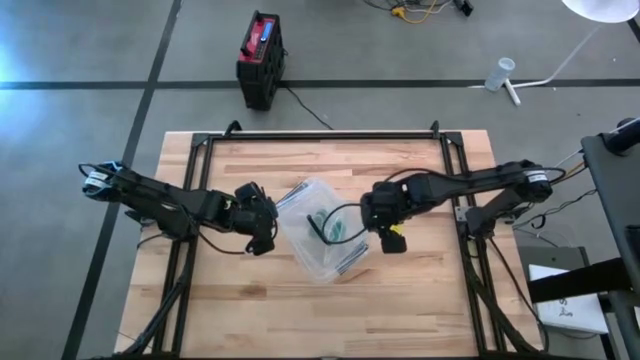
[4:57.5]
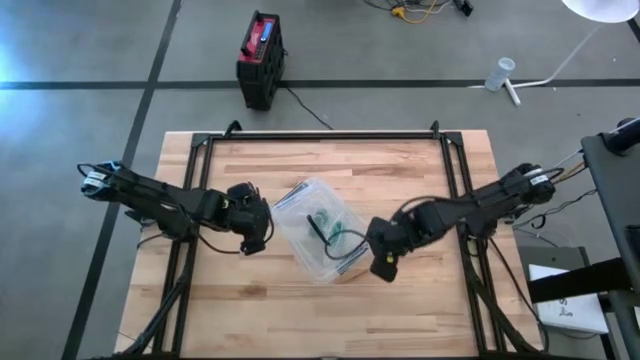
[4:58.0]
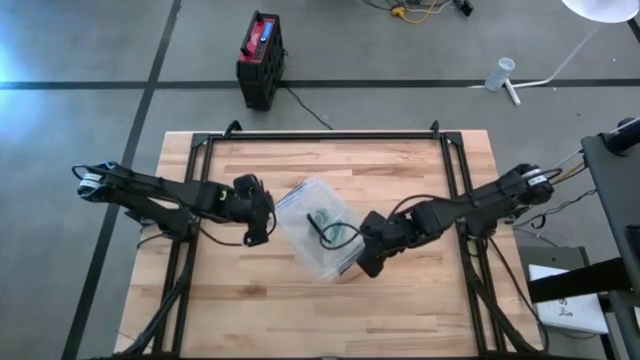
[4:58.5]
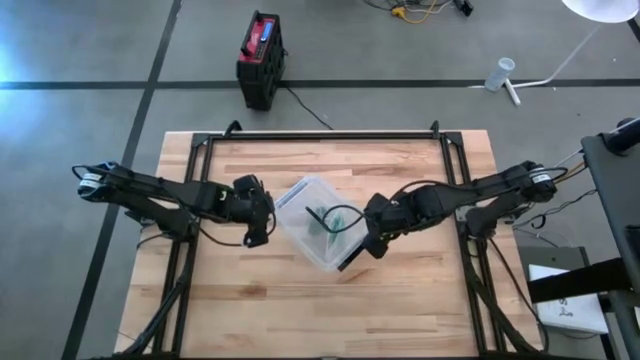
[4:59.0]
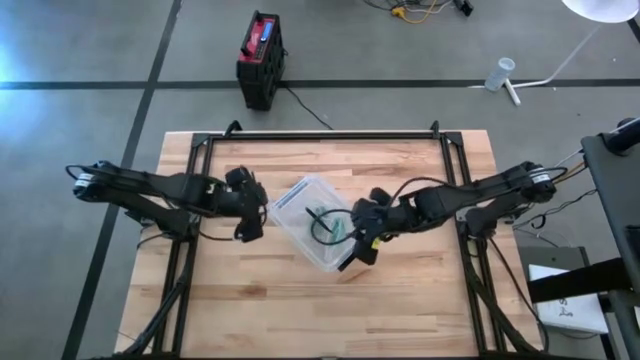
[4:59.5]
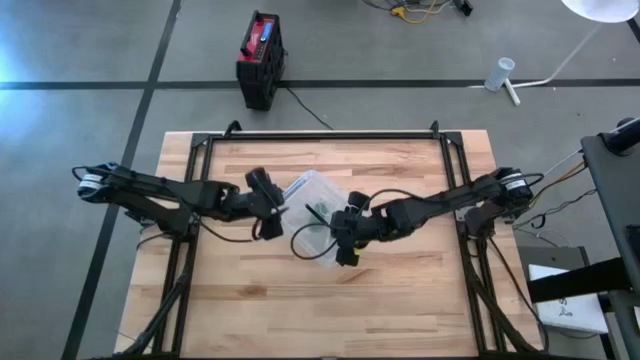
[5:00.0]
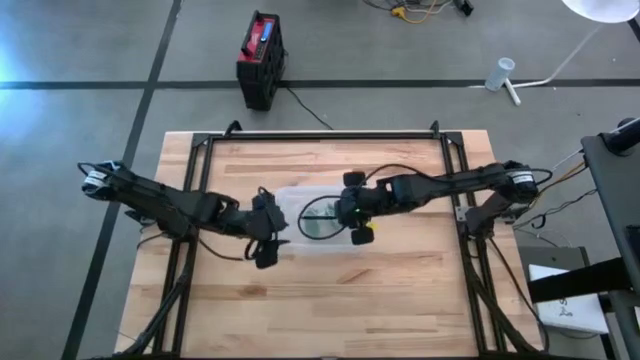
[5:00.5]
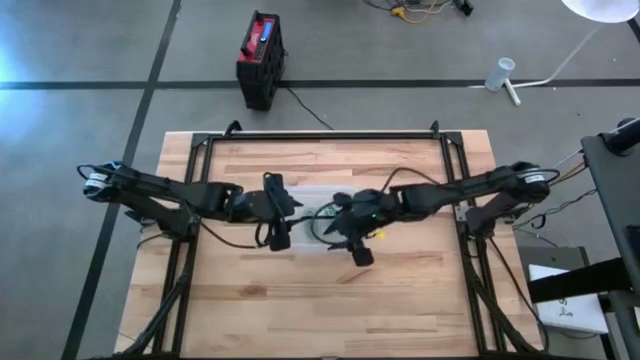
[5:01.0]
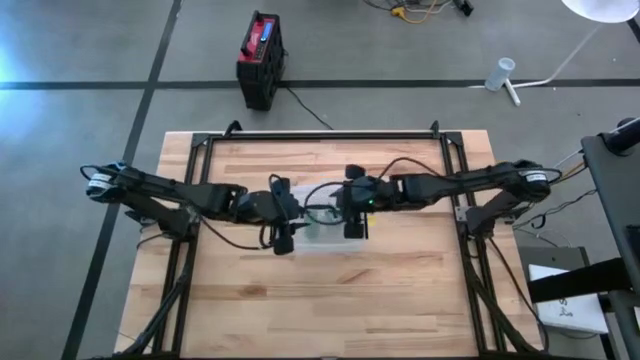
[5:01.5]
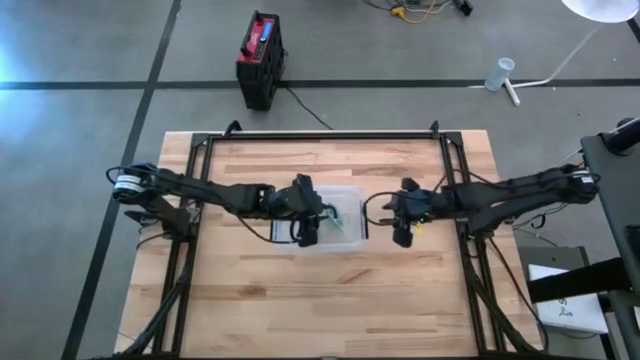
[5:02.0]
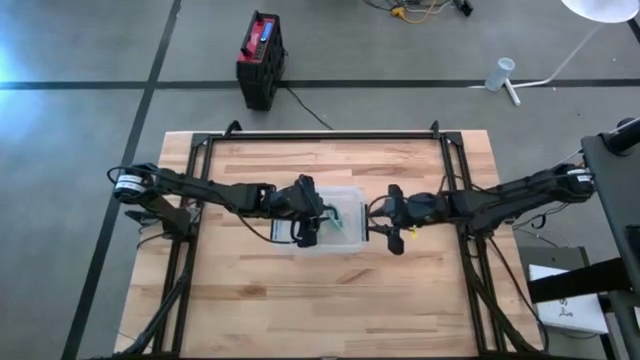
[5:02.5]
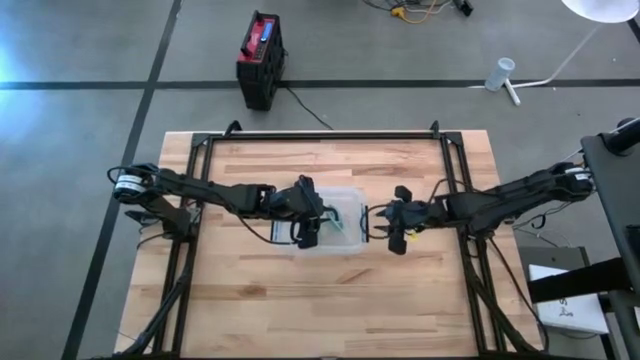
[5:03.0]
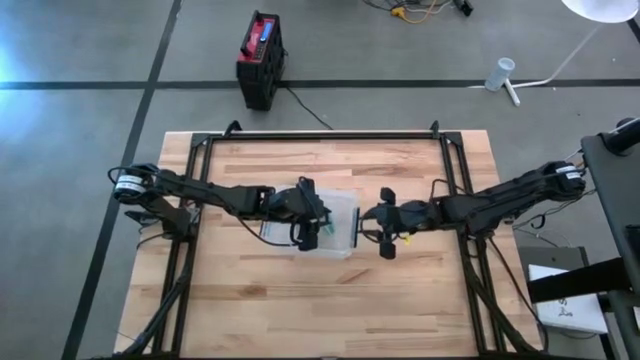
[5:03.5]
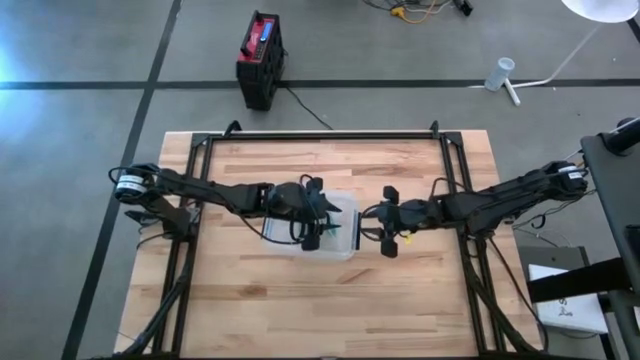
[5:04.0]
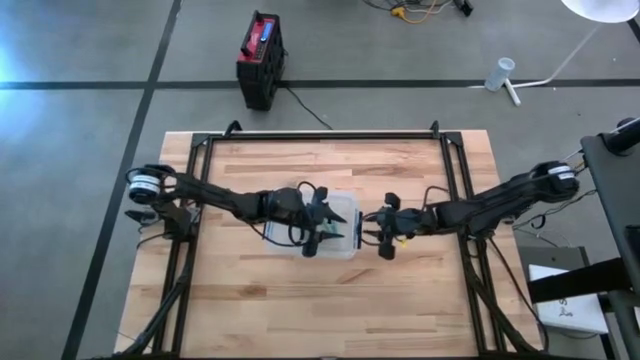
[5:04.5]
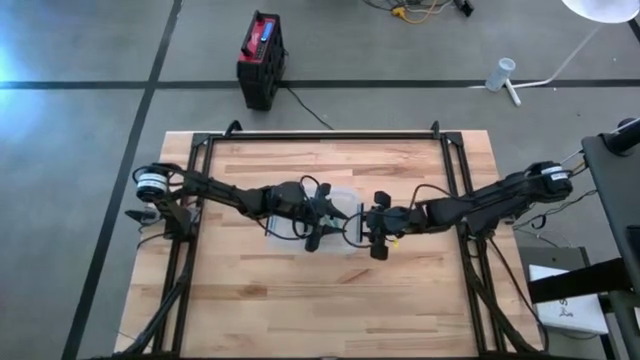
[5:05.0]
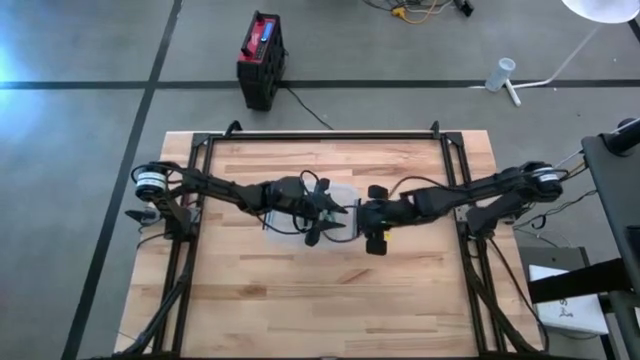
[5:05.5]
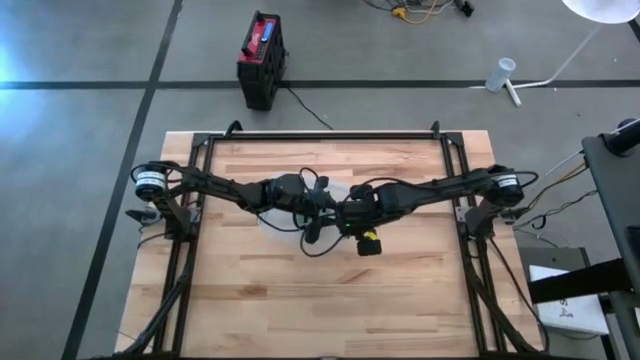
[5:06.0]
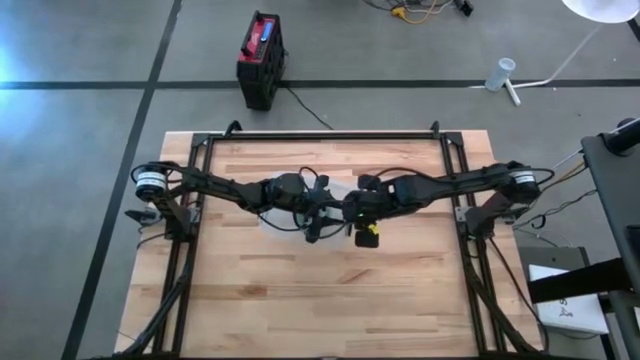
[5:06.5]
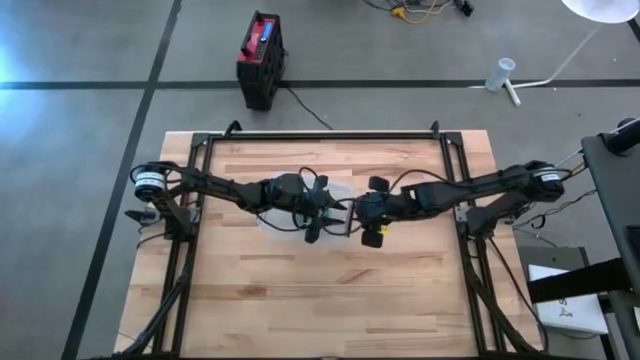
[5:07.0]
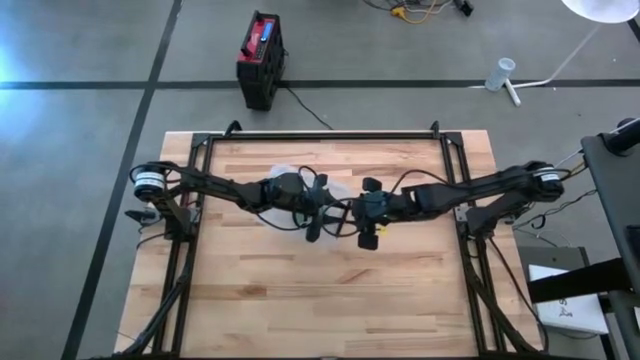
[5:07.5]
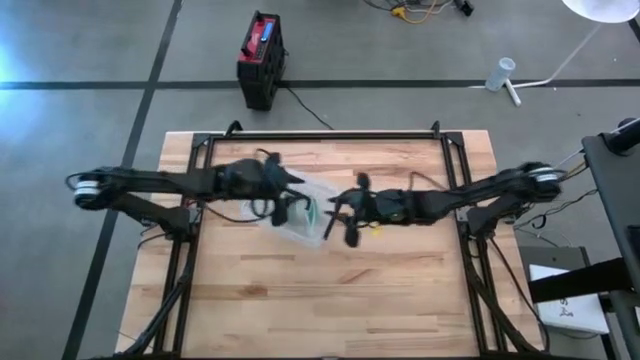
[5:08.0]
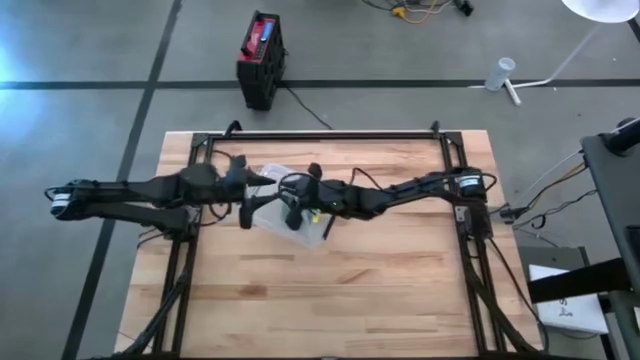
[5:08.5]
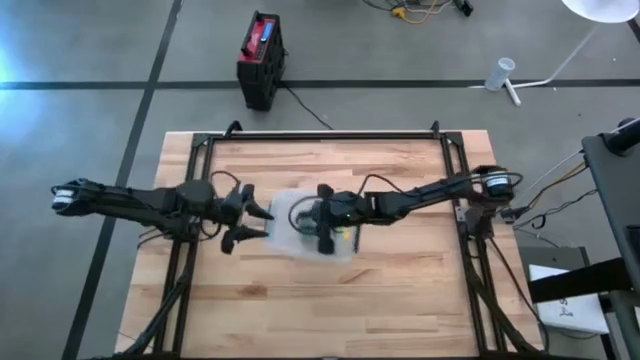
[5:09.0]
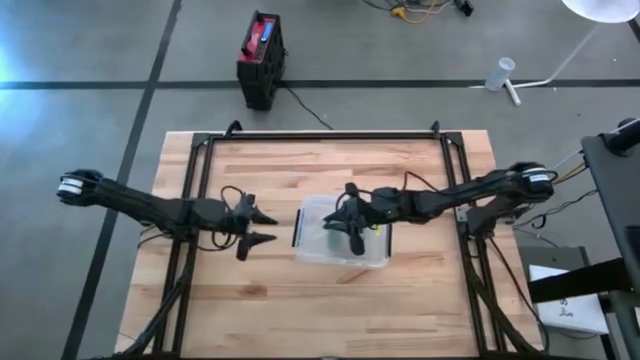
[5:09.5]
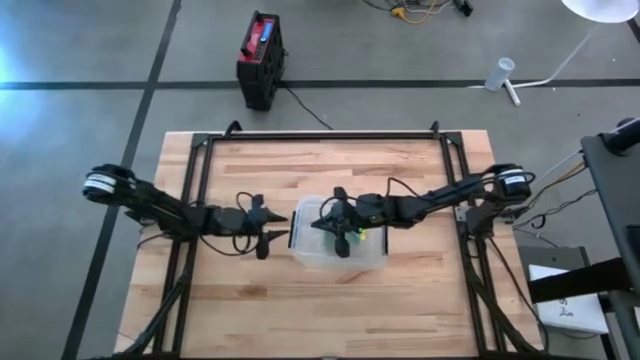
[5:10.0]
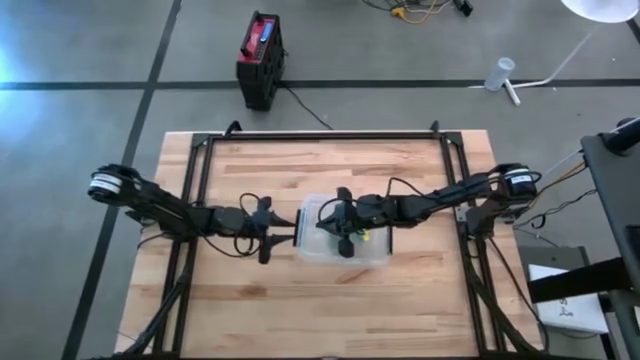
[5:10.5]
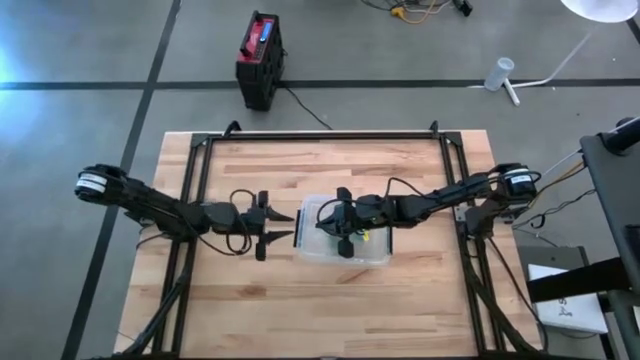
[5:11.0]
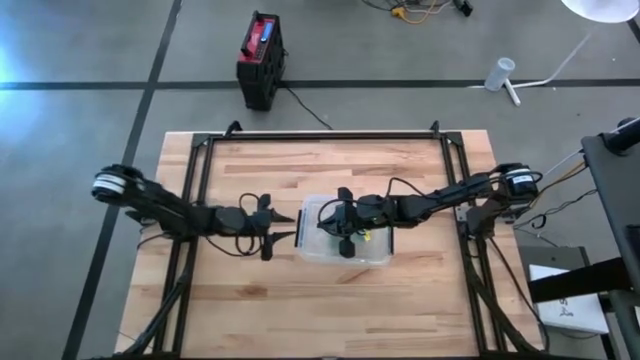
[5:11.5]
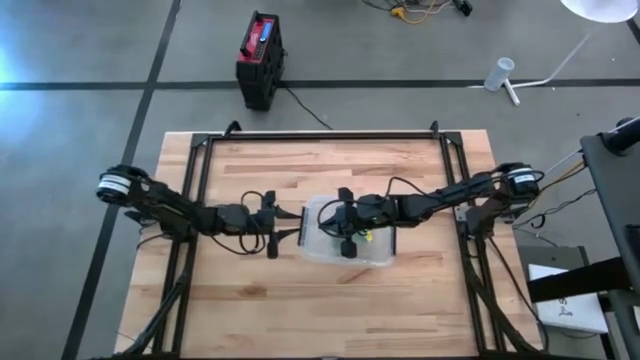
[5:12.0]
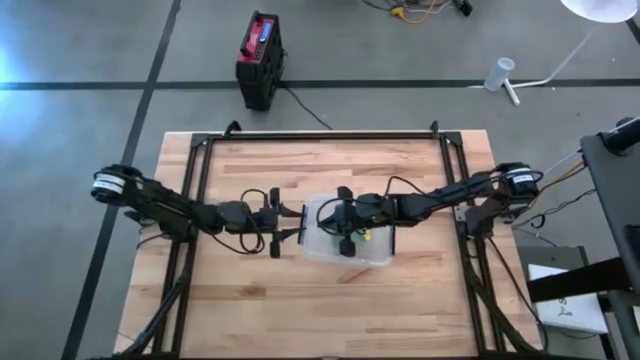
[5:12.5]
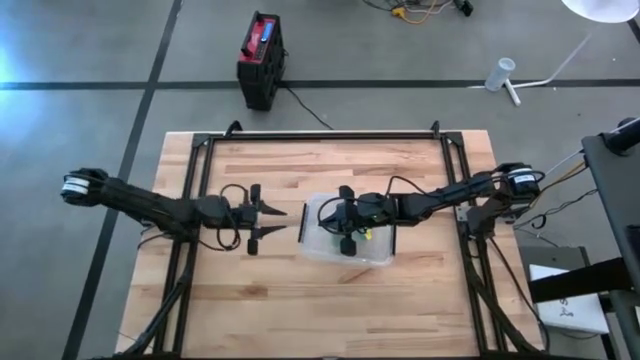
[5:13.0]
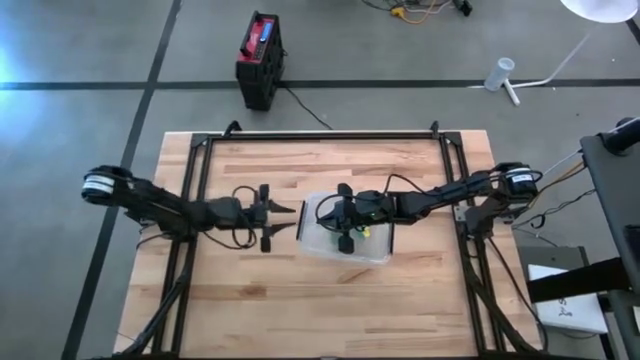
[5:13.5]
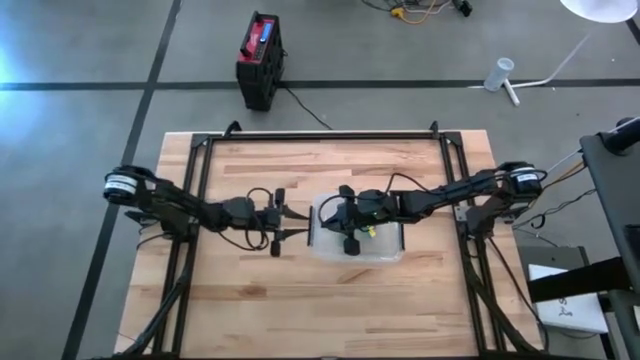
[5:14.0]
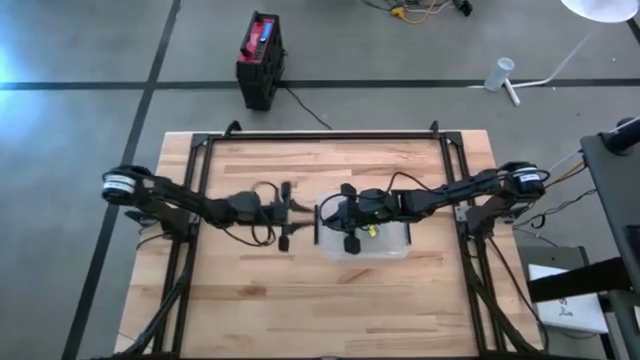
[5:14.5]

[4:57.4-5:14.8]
Task: Roll bandage
Close the transparent bin

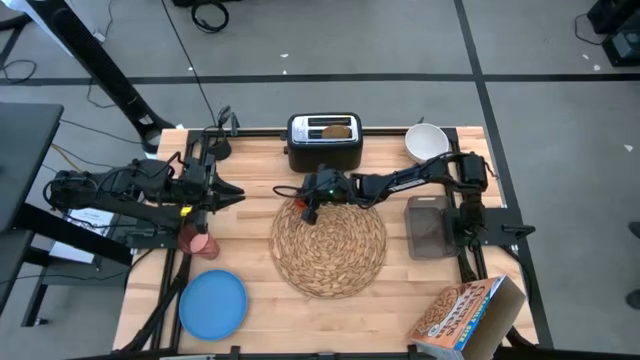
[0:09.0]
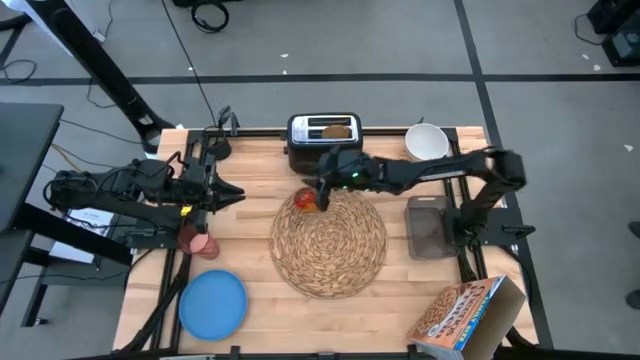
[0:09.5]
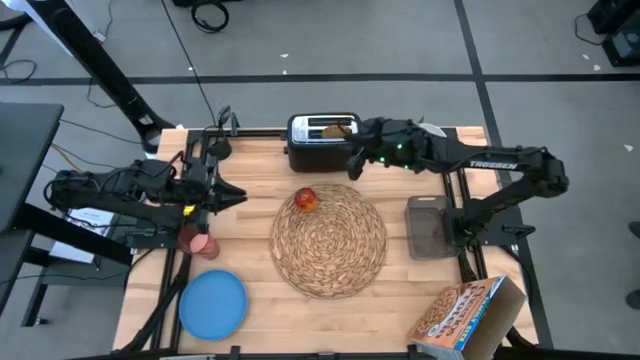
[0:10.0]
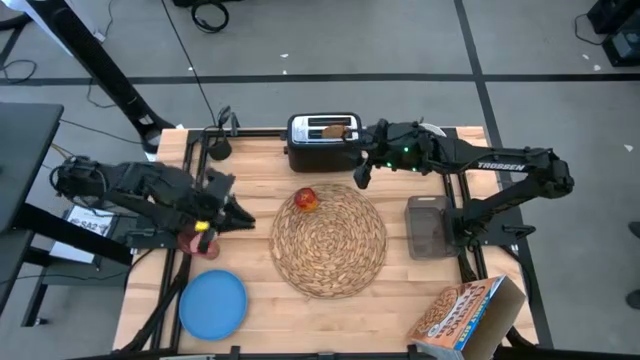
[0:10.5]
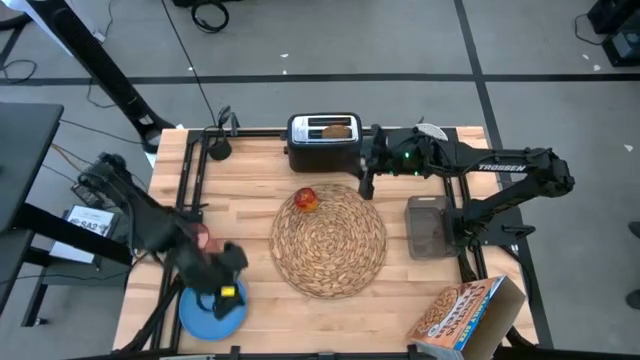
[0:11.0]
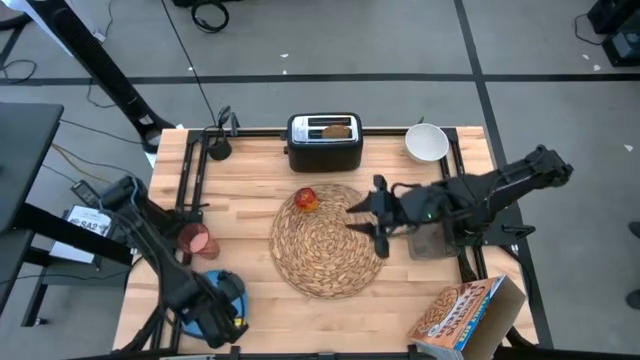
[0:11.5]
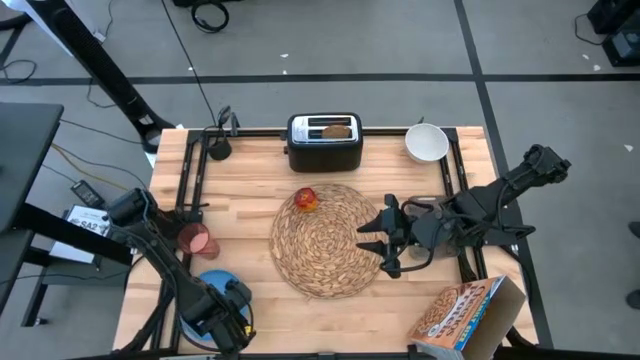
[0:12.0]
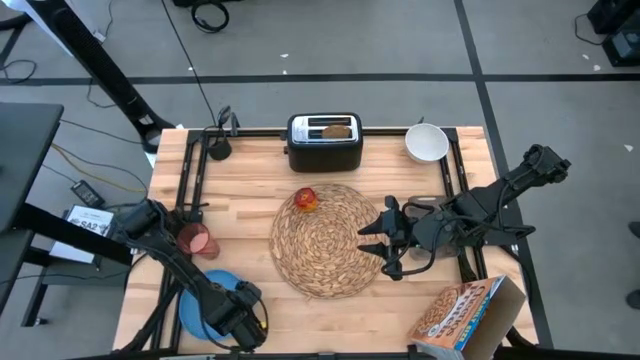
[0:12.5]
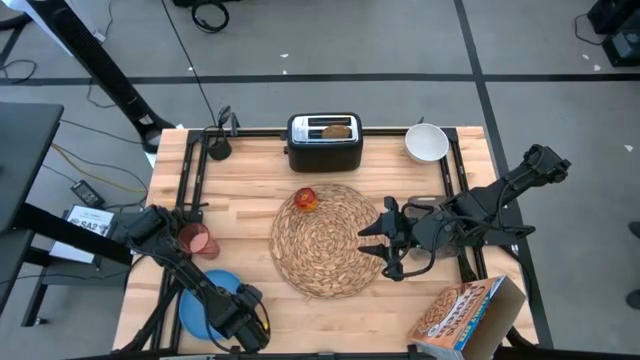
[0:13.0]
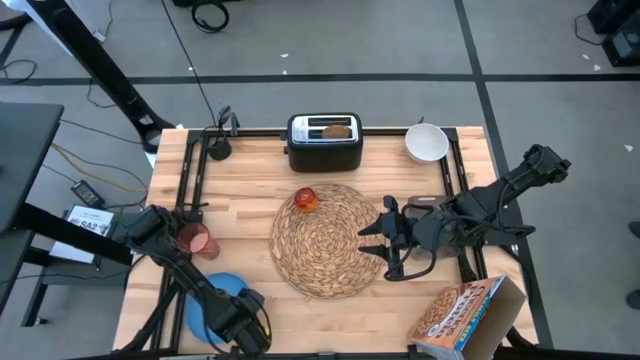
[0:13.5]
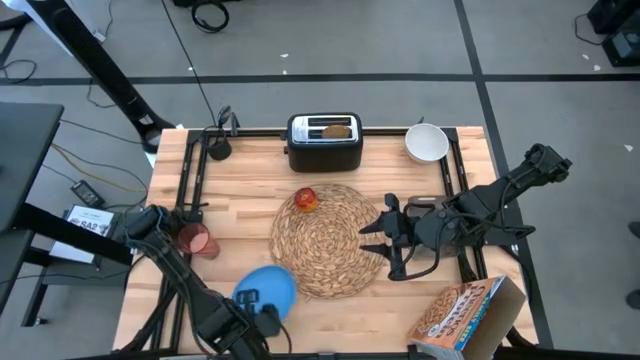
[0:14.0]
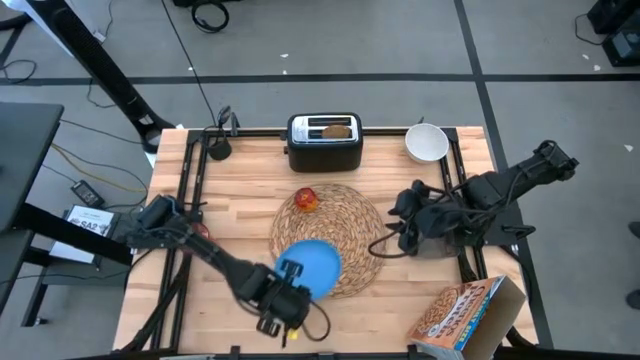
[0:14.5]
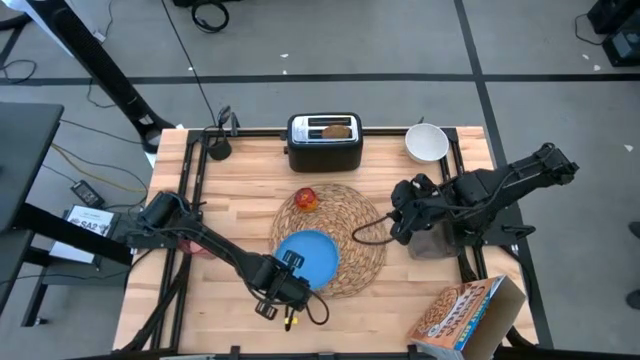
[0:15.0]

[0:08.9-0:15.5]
Task: Arrange a breakfast setting
Put the blue plate on top of the brown table mat to the bottom of the red apple
